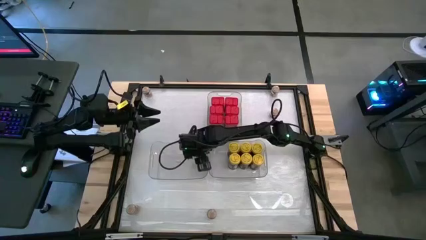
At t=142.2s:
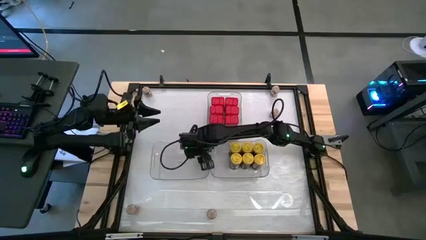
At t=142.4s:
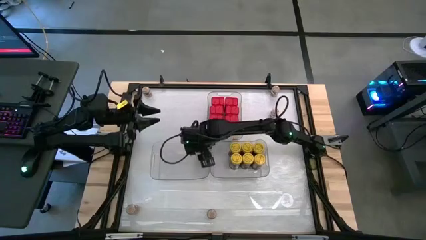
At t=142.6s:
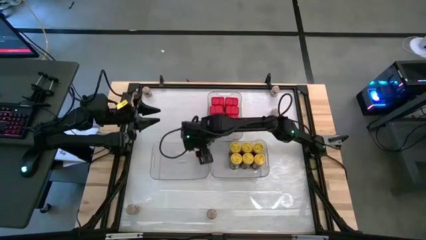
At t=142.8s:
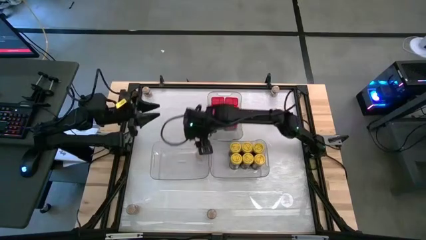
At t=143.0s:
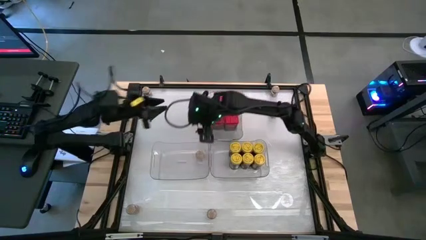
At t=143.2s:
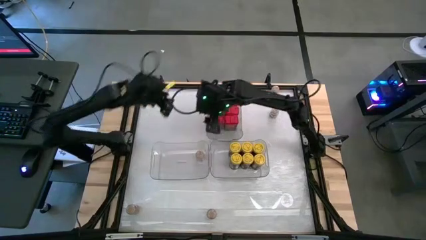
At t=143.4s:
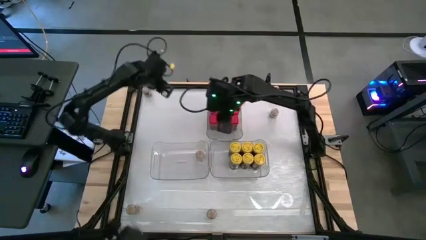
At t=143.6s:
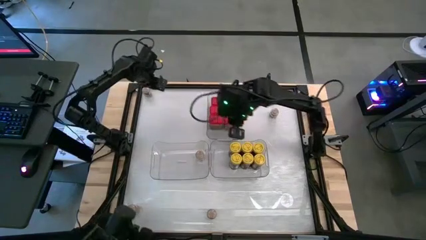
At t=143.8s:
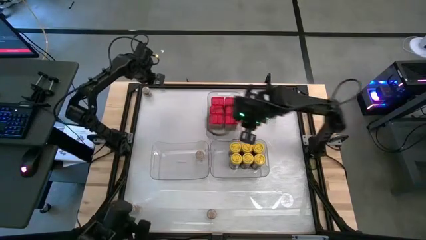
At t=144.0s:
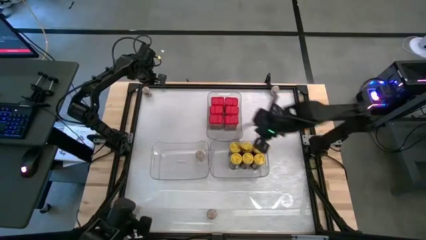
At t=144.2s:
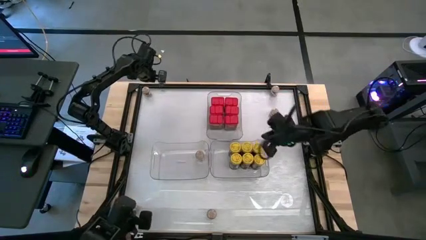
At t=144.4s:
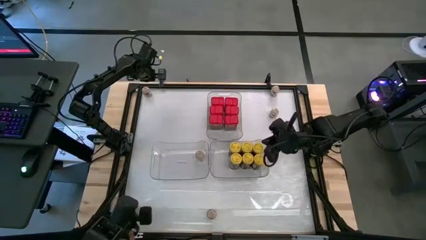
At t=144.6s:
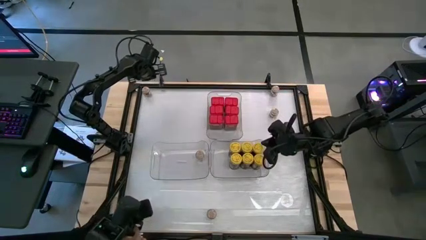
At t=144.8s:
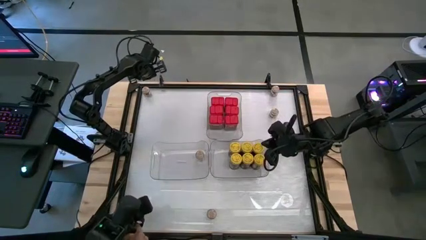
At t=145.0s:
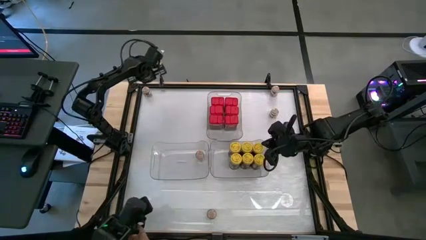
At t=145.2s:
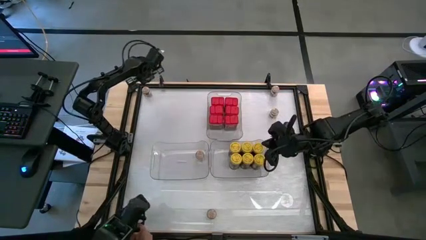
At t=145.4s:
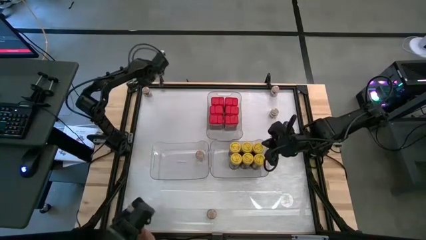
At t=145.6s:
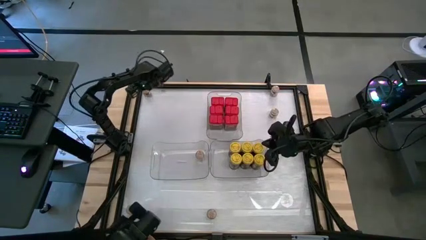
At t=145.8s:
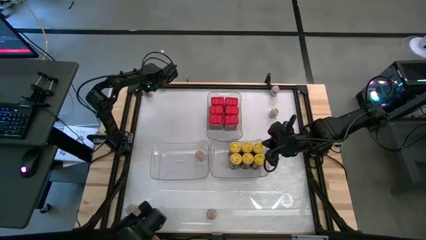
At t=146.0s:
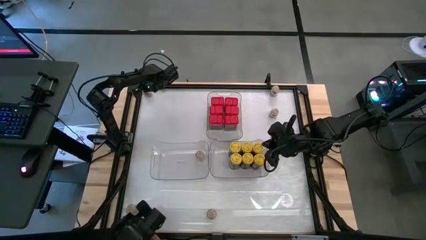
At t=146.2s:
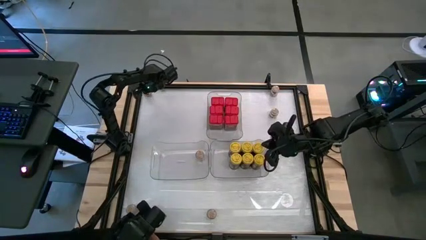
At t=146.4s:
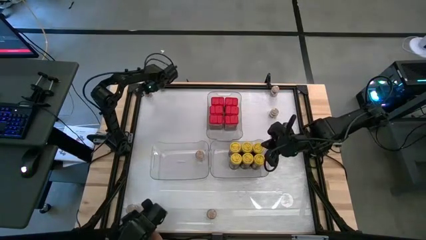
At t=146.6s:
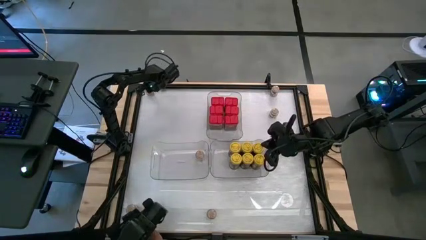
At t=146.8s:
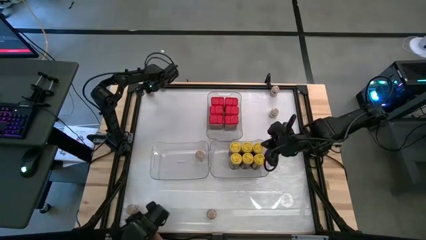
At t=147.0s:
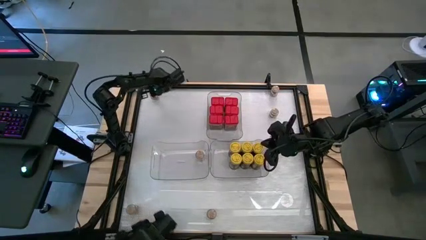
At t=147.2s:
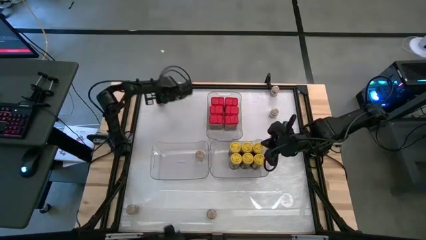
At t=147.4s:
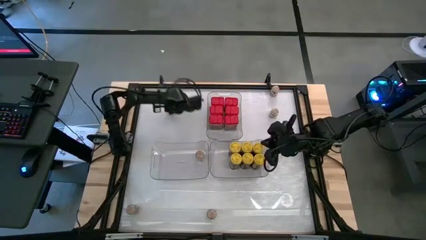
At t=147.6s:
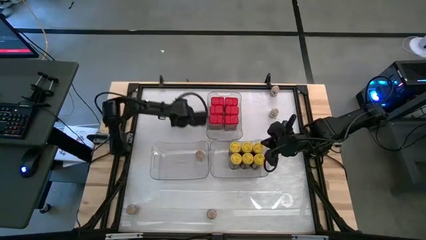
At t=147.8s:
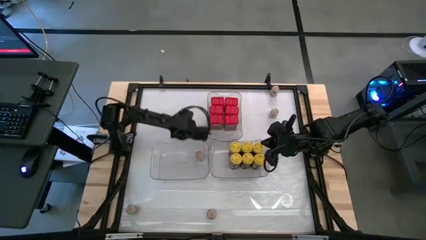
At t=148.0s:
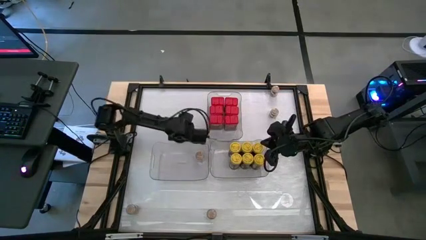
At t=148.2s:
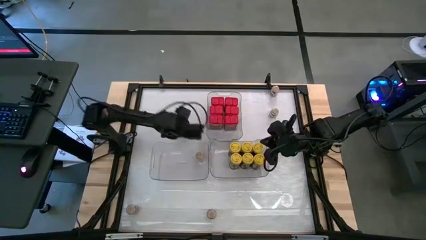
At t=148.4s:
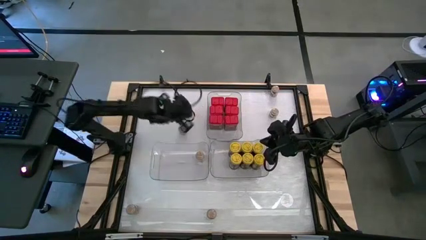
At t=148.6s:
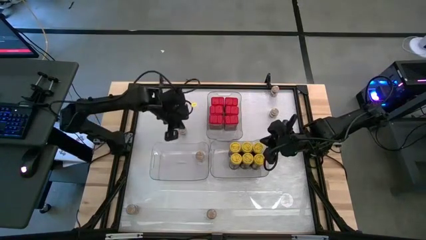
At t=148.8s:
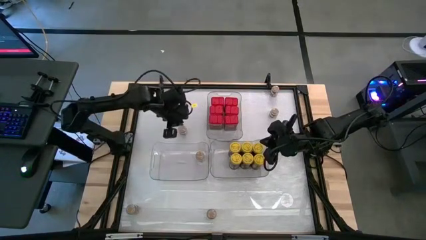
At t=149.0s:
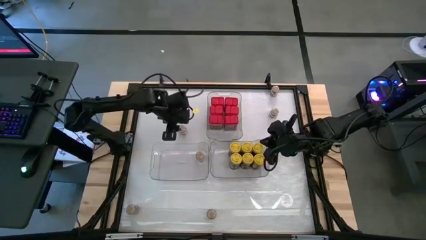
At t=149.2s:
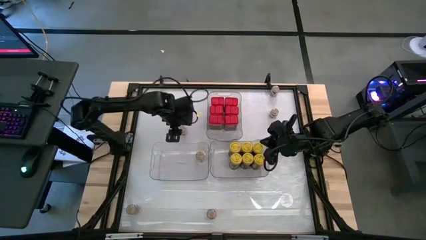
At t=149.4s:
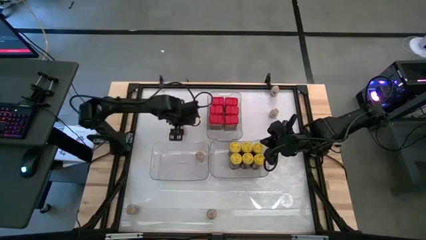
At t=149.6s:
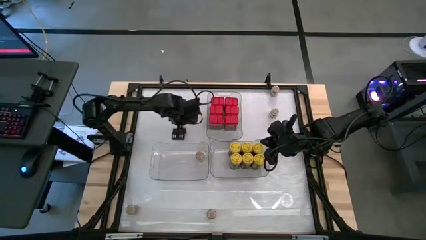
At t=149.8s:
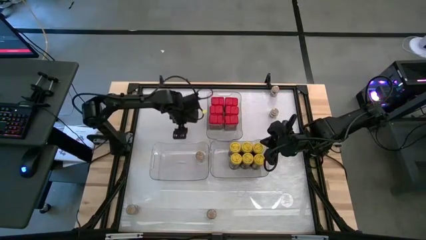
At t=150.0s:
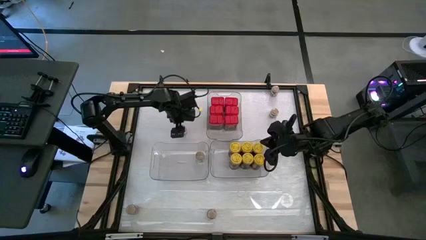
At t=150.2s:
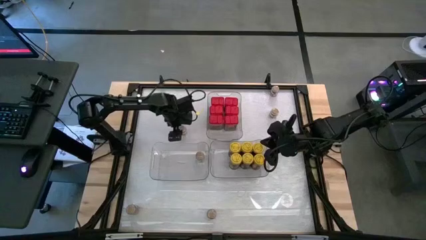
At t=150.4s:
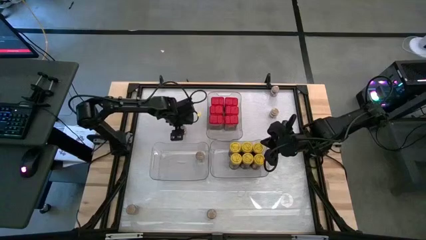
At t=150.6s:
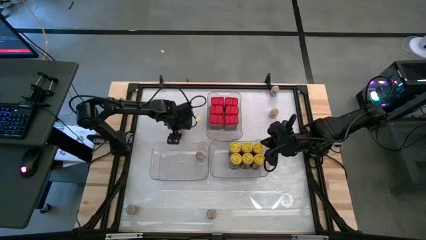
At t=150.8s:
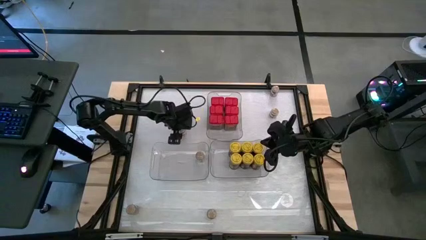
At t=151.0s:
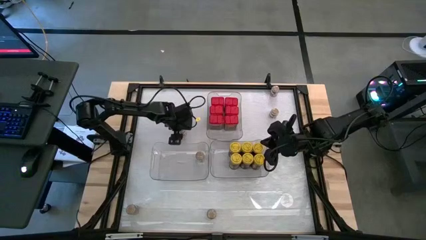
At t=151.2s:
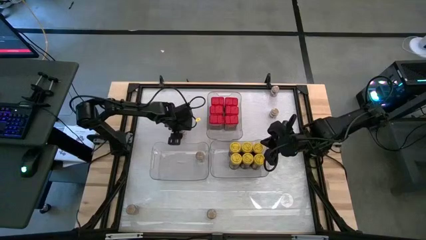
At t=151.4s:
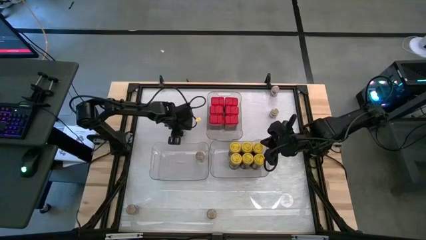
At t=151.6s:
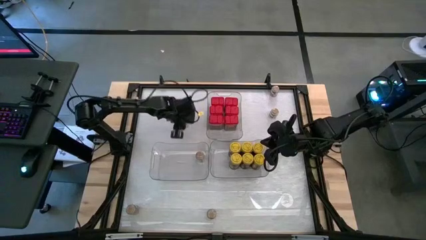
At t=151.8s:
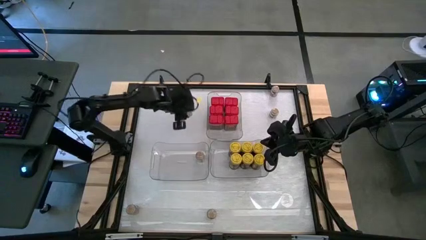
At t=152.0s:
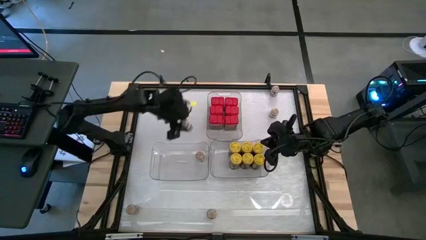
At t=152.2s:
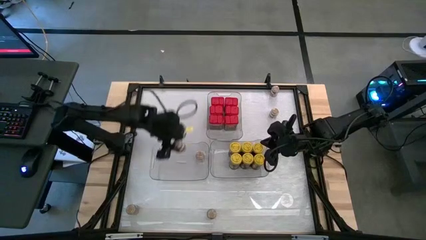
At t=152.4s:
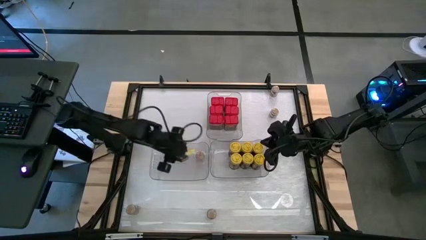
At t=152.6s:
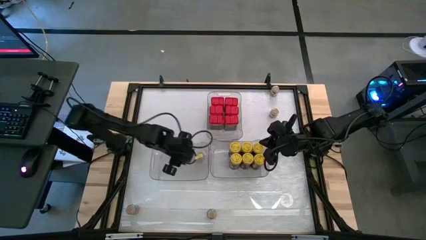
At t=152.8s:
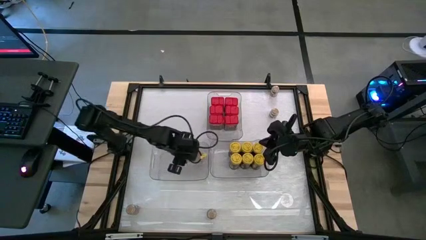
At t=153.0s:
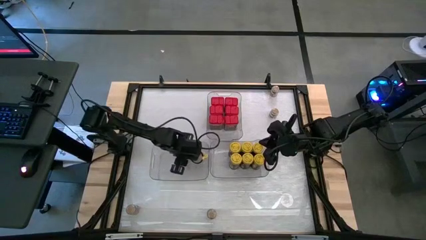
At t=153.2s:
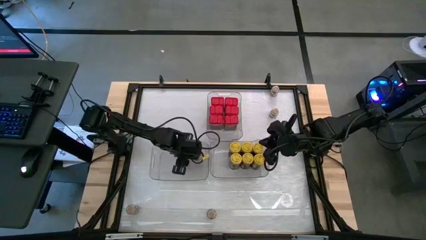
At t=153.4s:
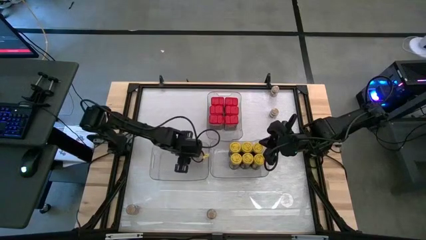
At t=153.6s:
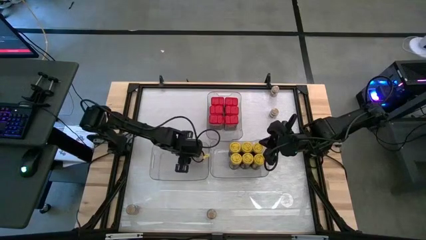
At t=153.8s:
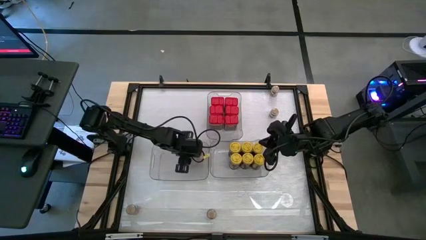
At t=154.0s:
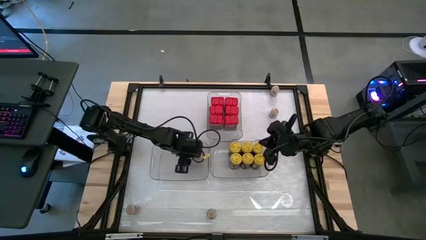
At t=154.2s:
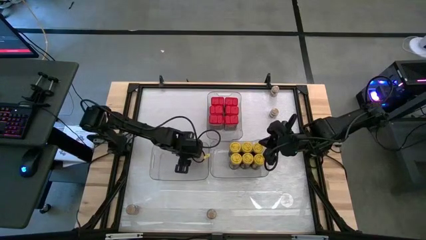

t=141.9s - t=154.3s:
Task: Sort spices by type
Put the brown seasoning bottle into the bottom left transparent bin

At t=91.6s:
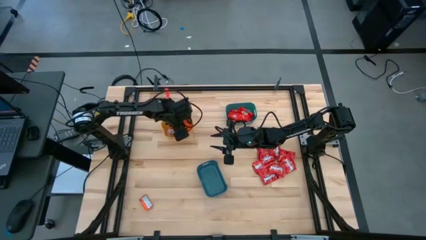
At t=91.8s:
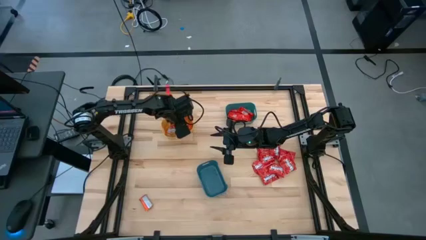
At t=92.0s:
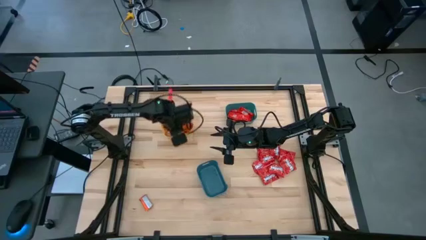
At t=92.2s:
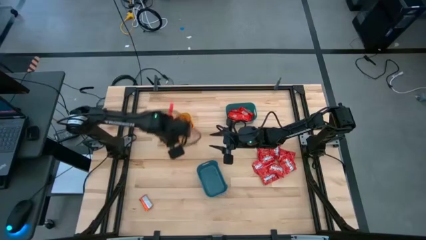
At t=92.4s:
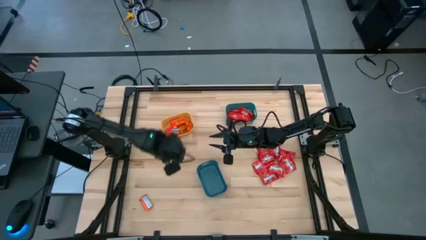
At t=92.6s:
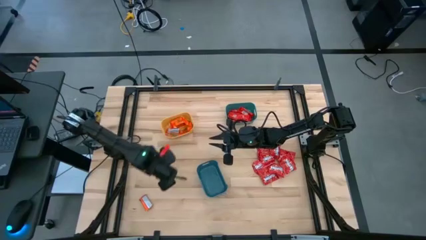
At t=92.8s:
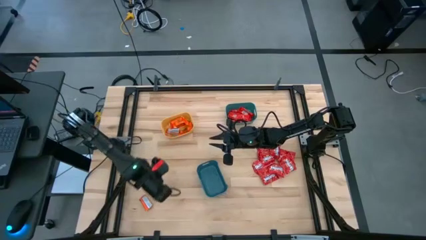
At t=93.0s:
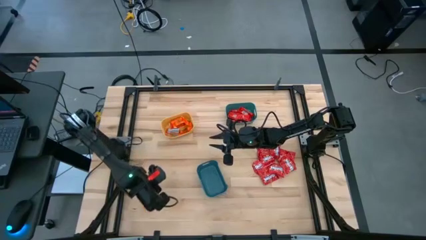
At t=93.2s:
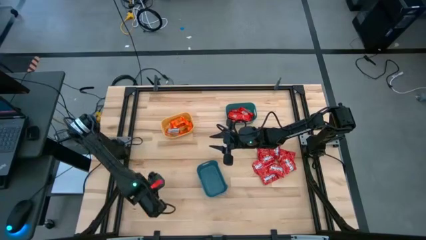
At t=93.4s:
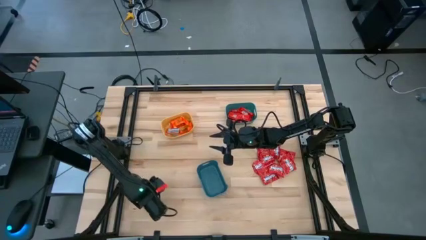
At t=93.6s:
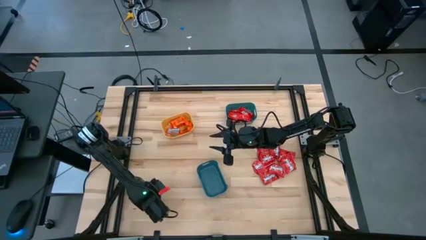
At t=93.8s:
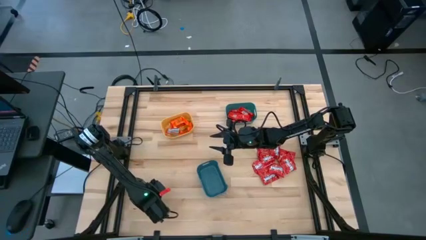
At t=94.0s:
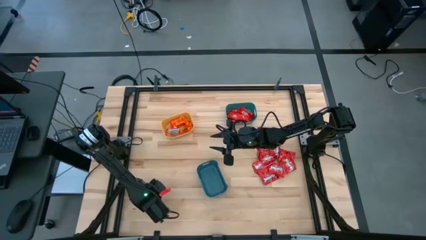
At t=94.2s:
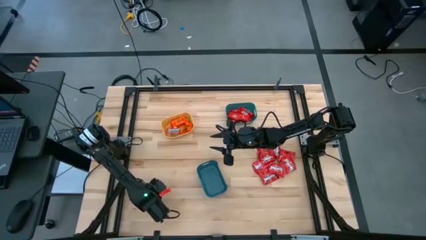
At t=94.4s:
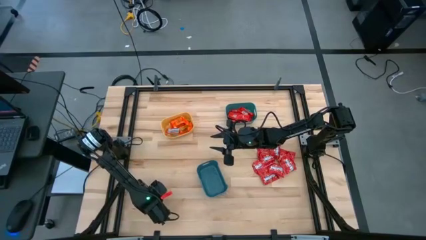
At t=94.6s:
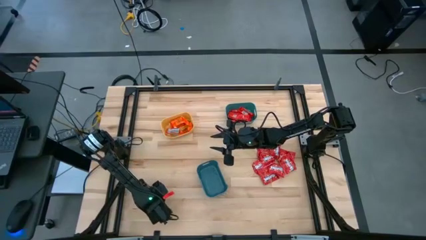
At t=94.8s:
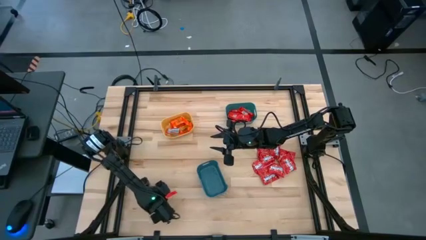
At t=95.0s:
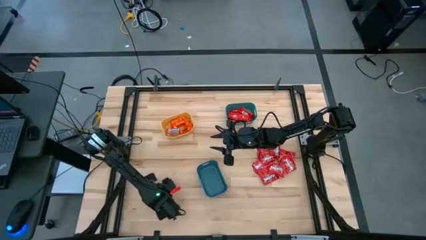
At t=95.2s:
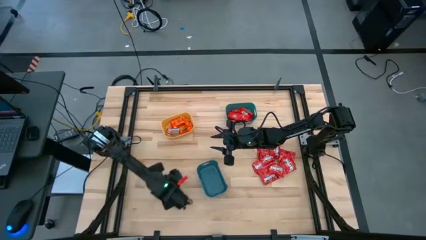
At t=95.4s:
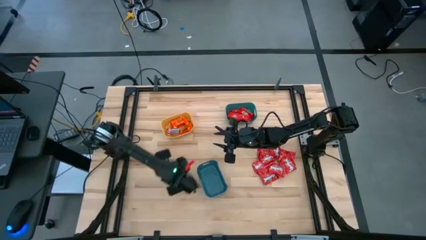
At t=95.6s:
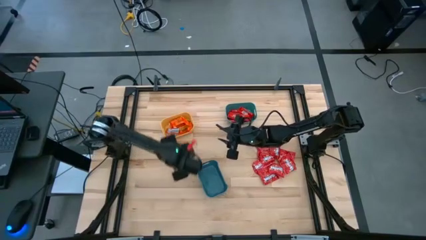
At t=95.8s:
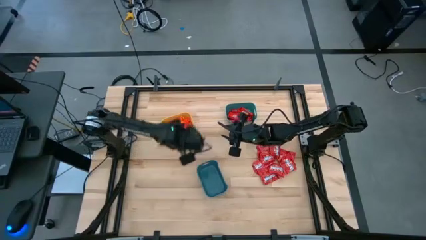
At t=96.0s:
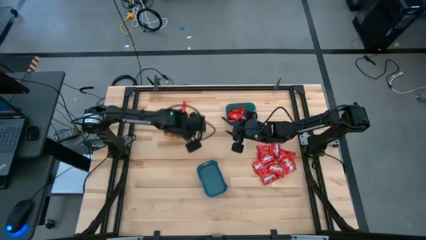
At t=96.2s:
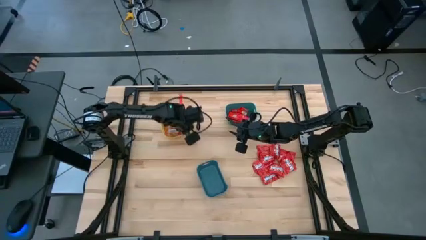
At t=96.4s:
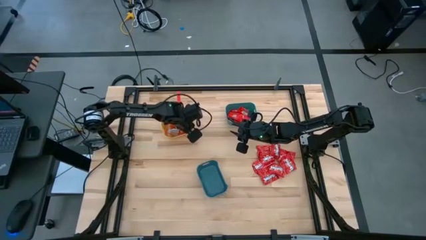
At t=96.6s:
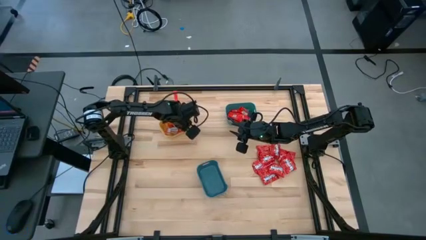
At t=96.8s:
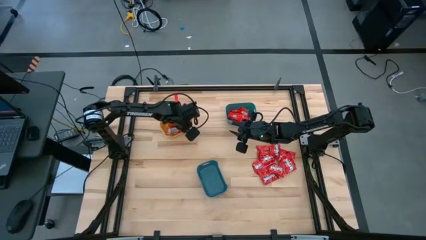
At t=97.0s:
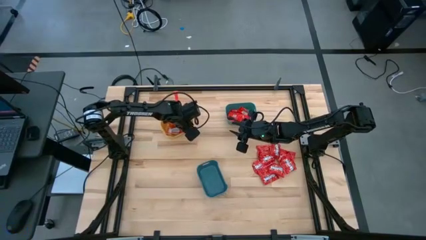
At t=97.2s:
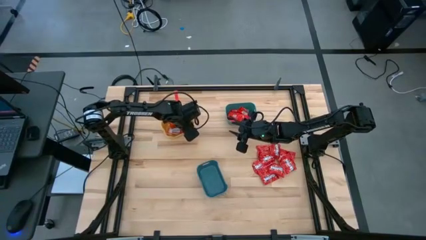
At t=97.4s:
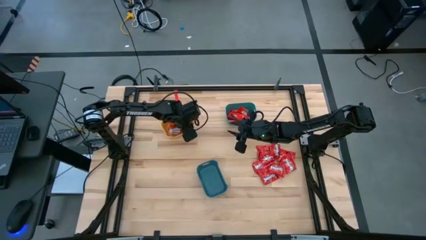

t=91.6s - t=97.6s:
Task: Sort candy
Put the orange chocolate bar into the yellow bin
